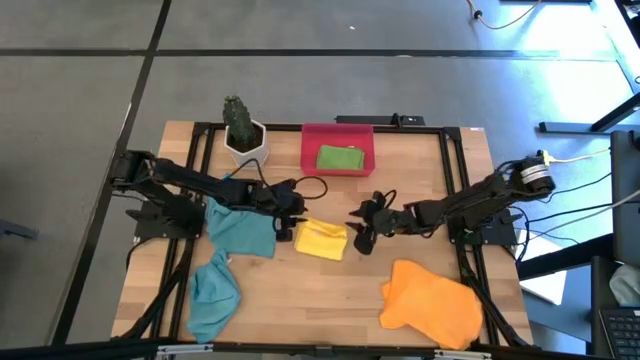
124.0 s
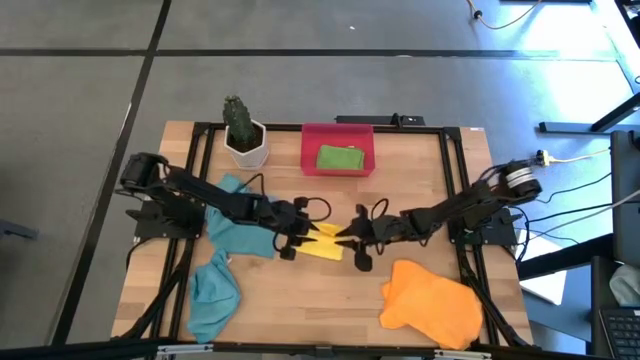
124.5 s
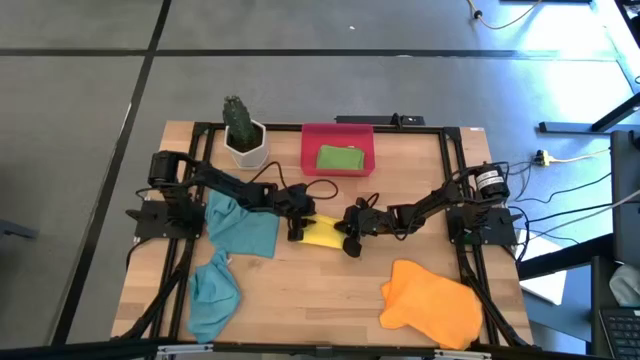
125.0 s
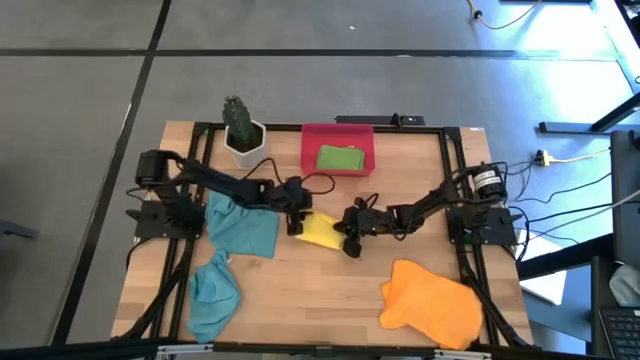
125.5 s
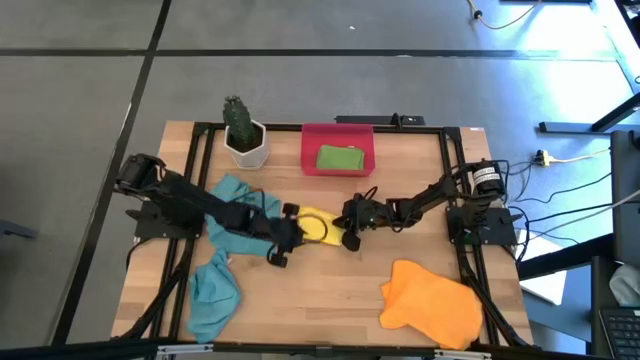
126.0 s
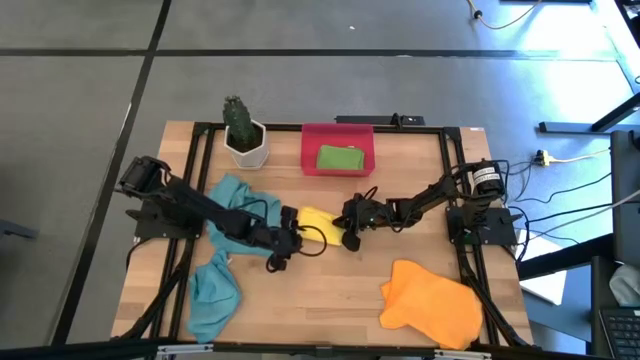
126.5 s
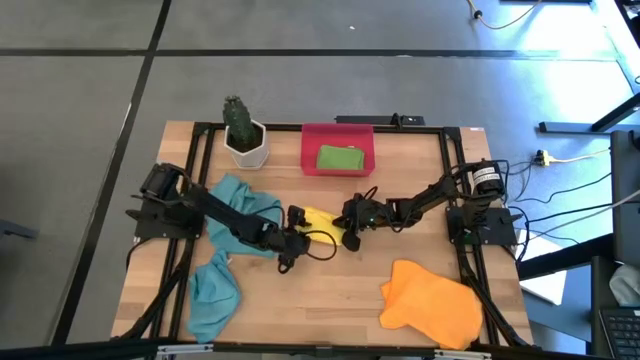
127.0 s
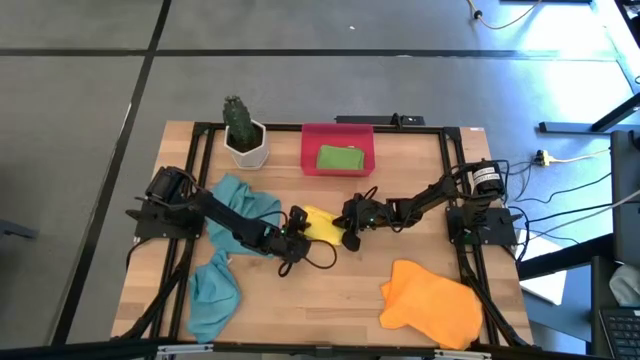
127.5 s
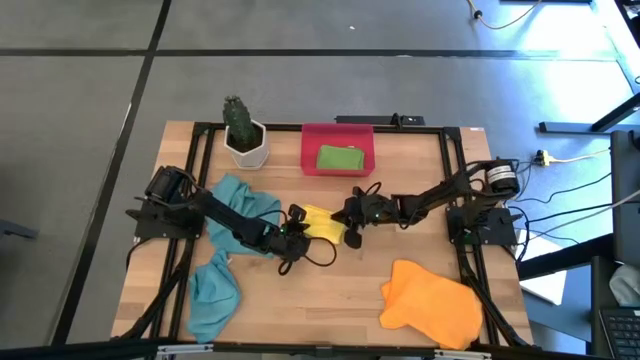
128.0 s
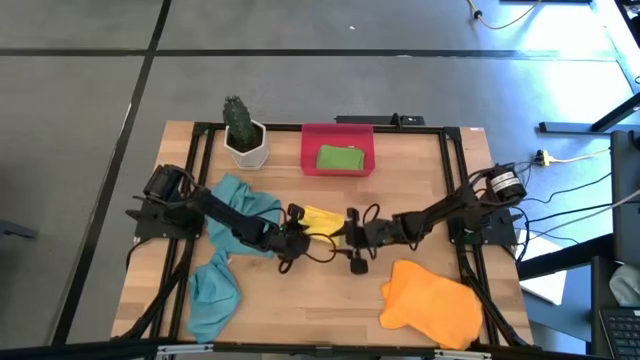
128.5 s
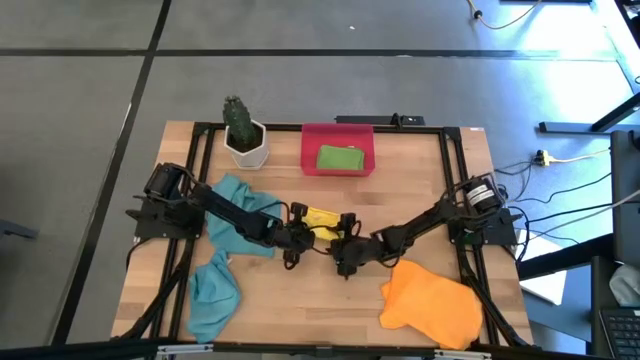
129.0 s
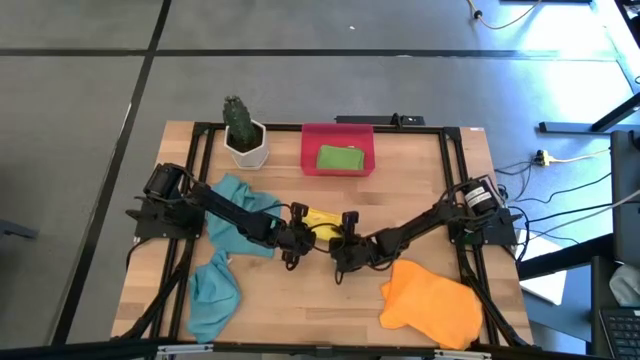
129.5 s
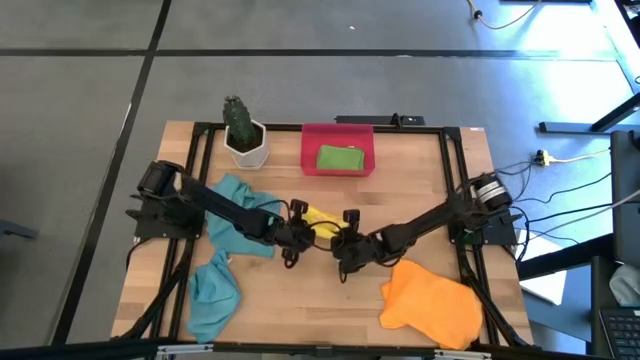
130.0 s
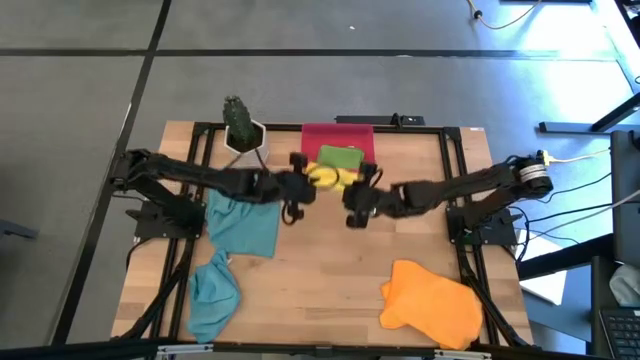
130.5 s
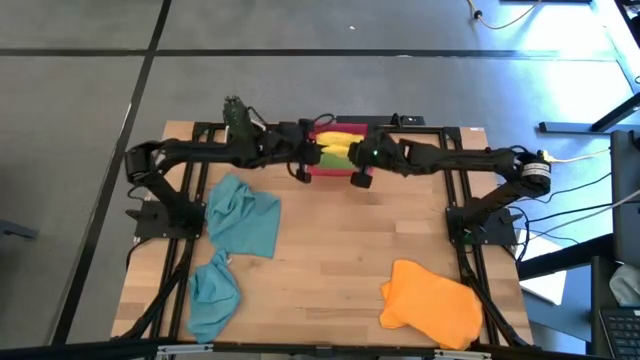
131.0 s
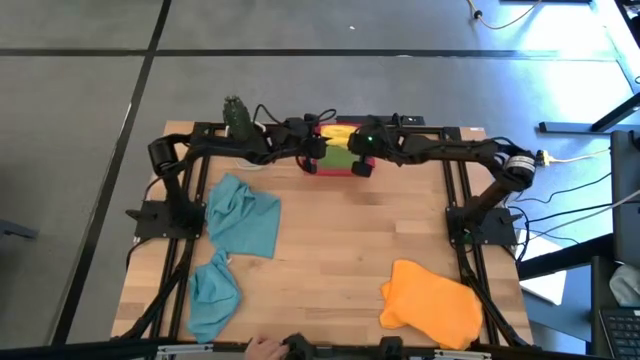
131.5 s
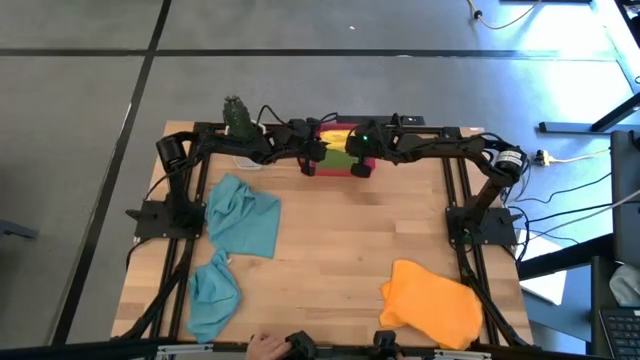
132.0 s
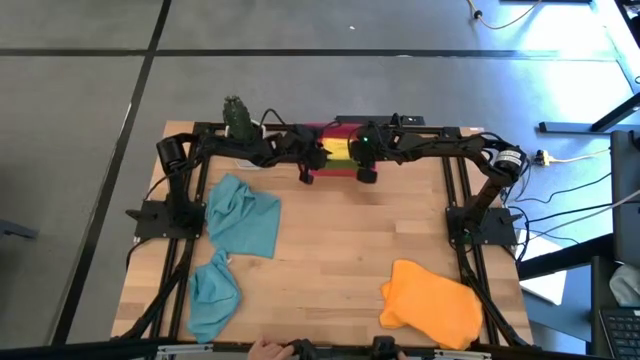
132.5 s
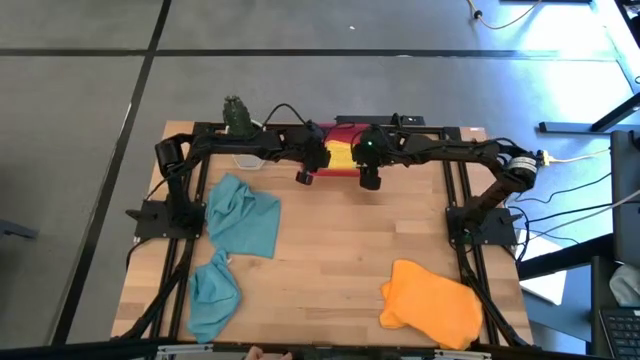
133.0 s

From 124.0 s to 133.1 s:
Task: Fold microfiber towels
Put the yellow microfiber towel into the red bin

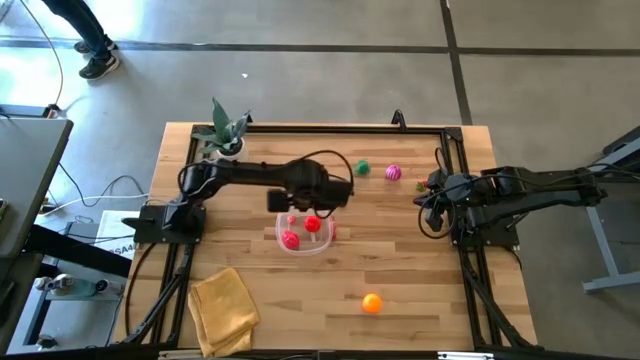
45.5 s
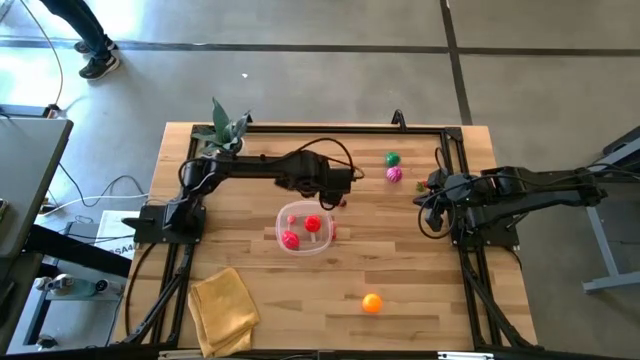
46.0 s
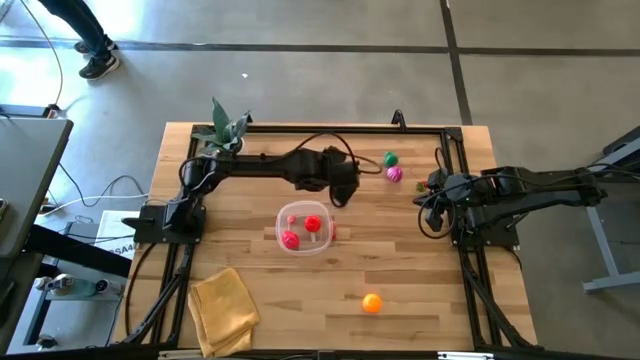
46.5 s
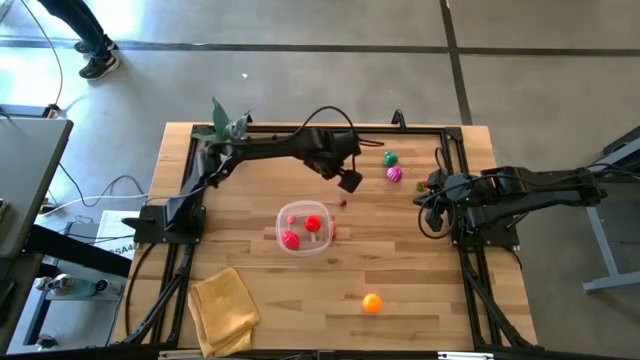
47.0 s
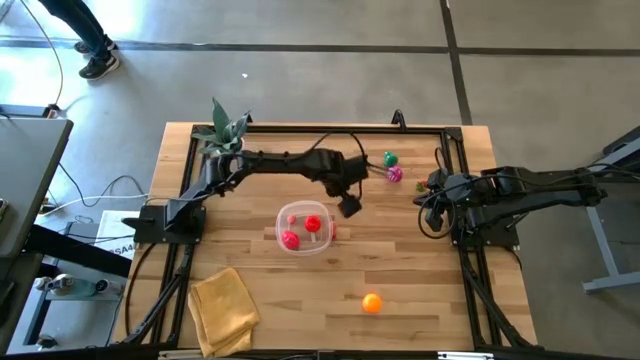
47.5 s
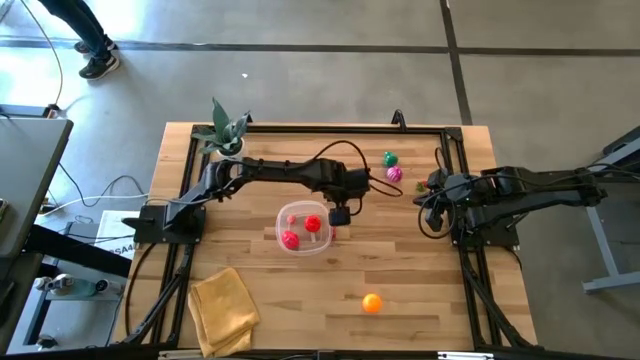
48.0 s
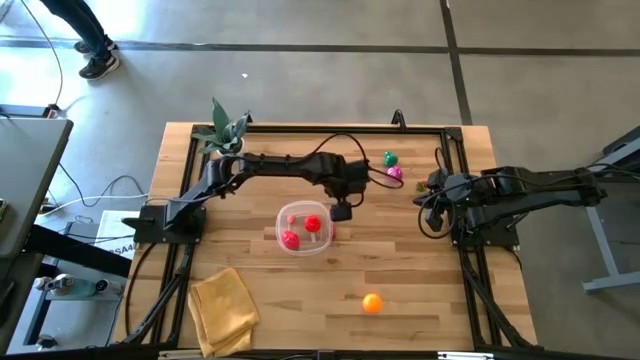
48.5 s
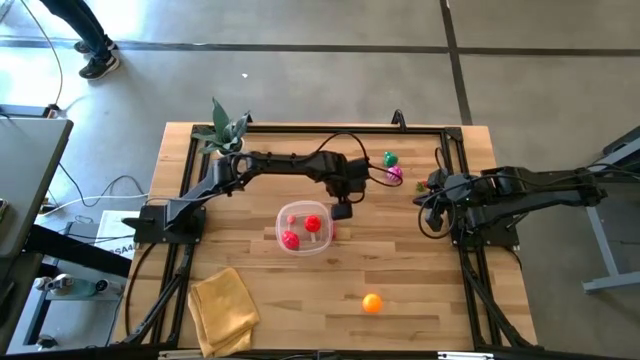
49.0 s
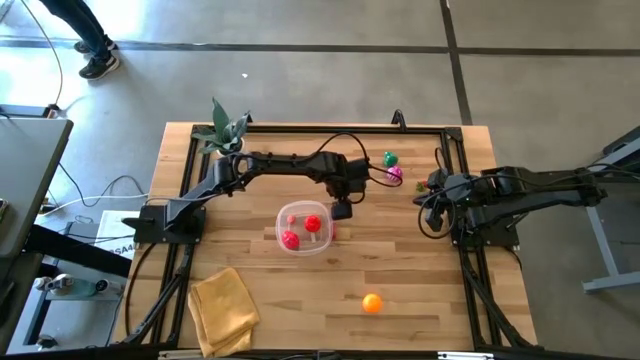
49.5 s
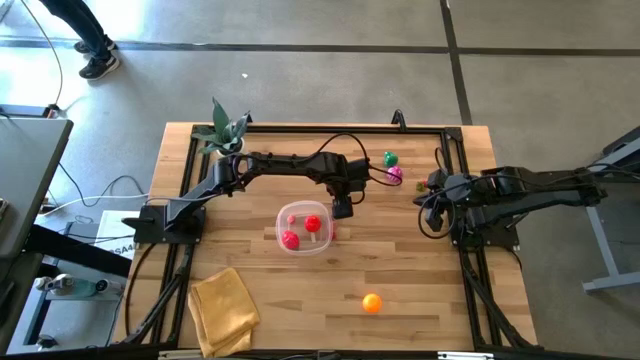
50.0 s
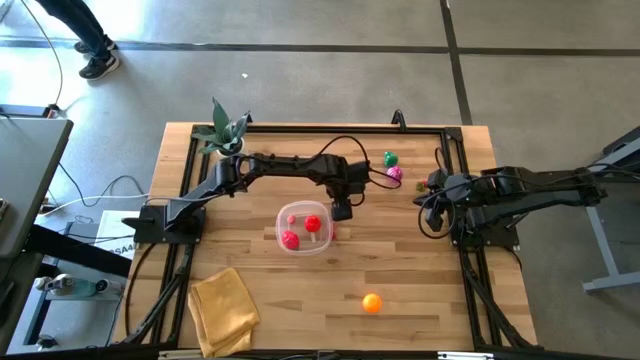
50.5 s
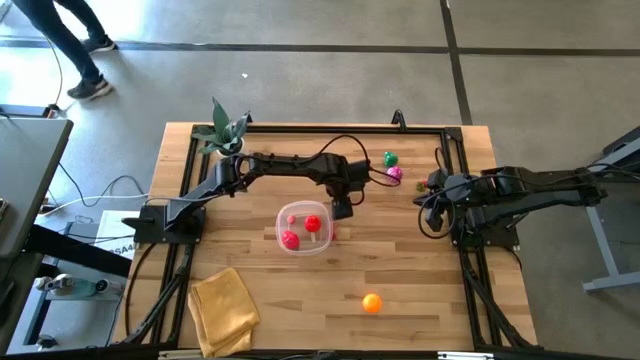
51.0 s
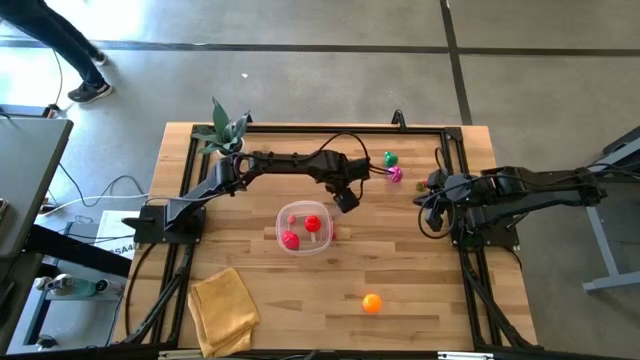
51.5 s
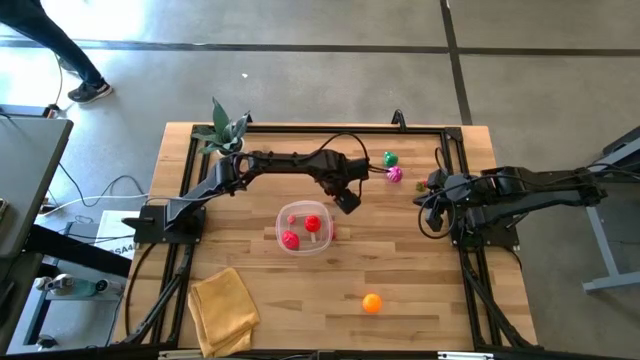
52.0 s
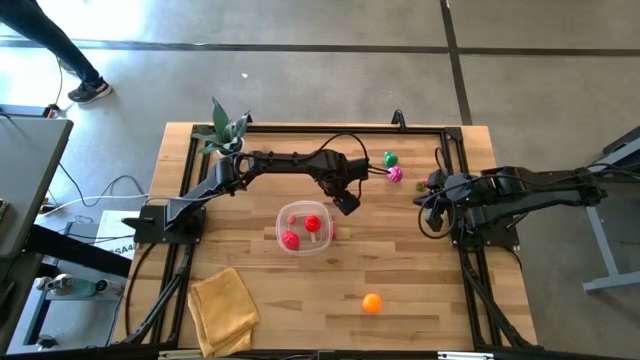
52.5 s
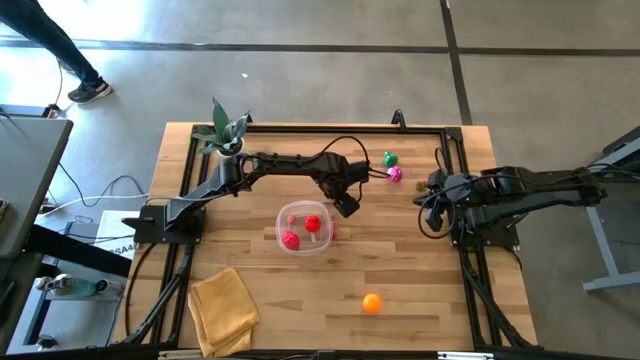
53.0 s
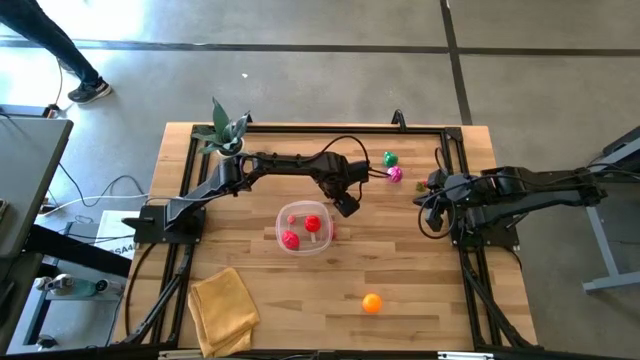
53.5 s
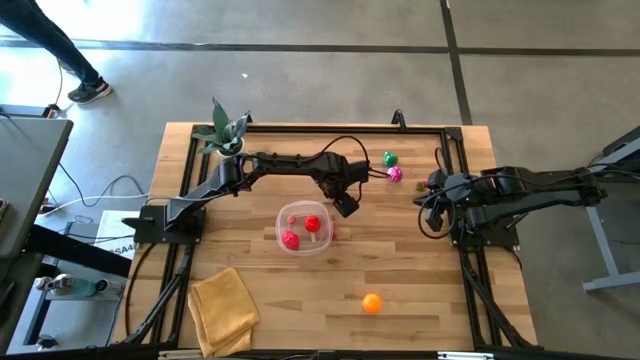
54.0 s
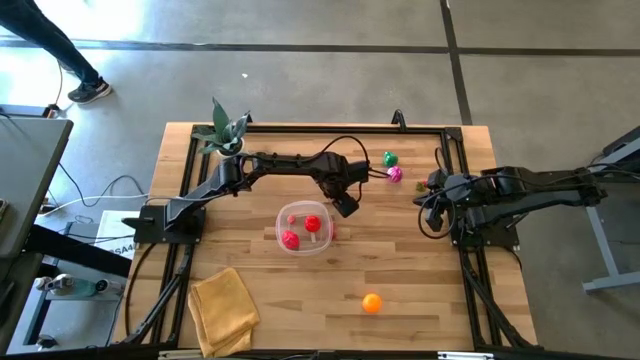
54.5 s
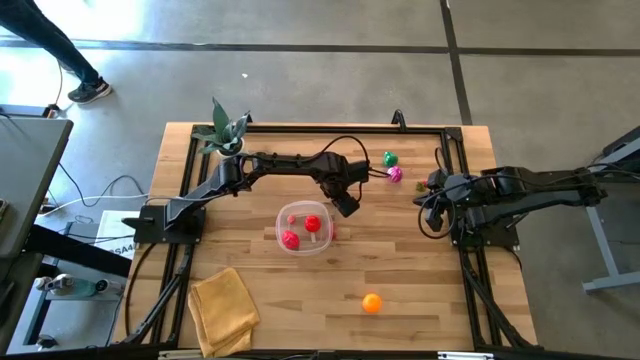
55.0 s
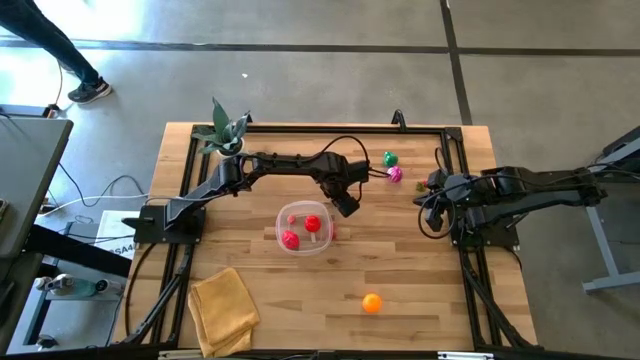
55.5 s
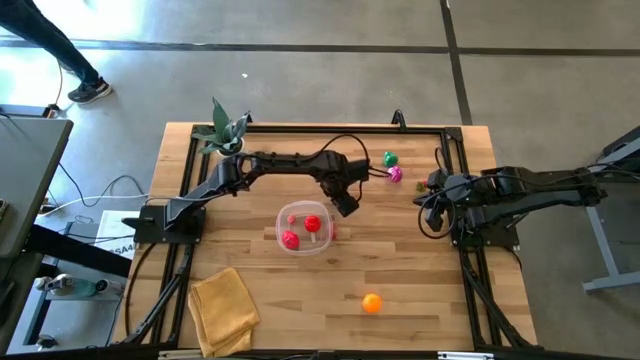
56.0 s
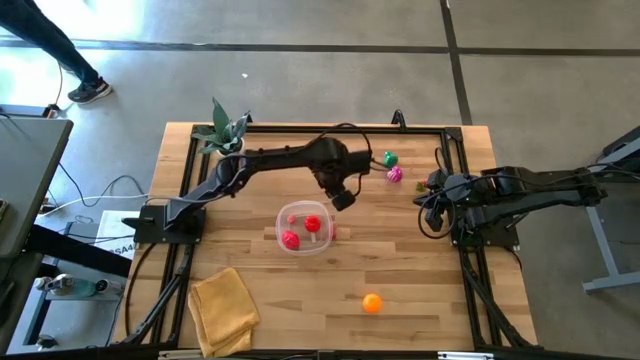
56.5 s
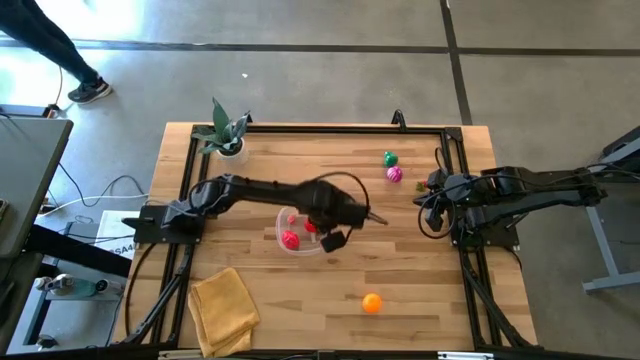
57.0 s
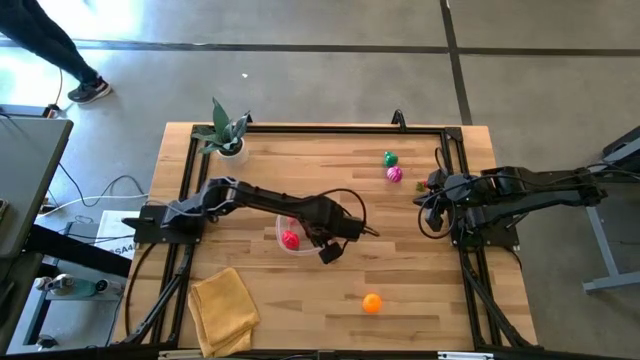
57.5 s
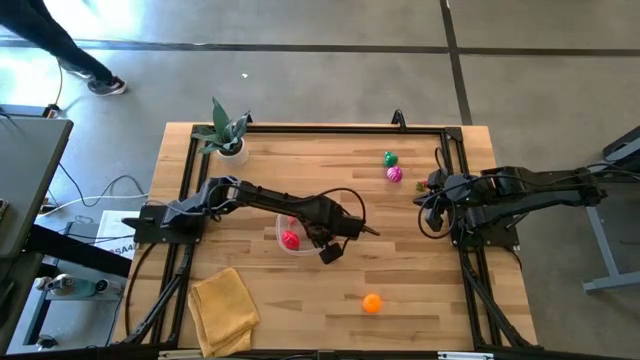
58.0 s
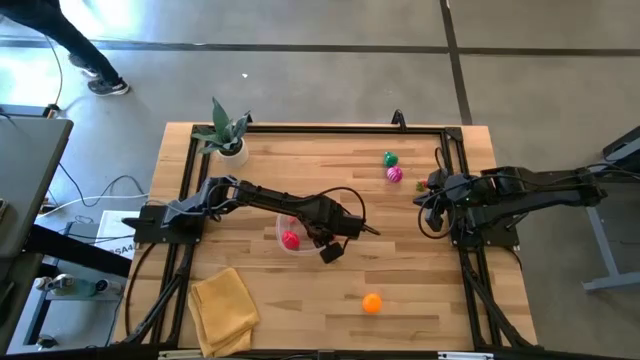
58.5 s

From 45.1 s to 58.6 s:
Task: Pick and placing Produce into tupperware
Put the top red cherry into the transparent container
